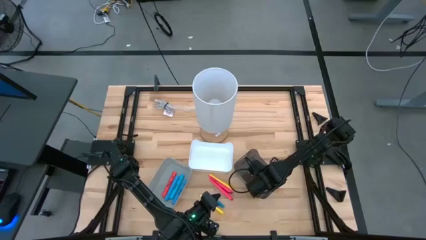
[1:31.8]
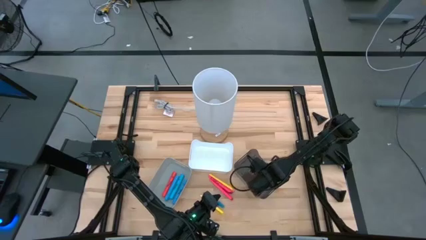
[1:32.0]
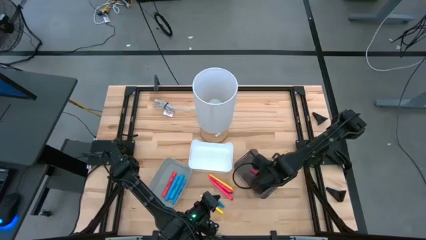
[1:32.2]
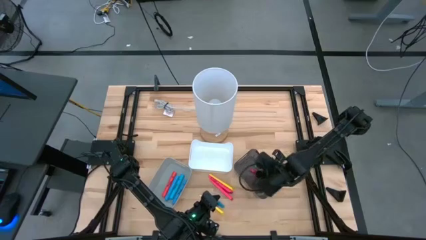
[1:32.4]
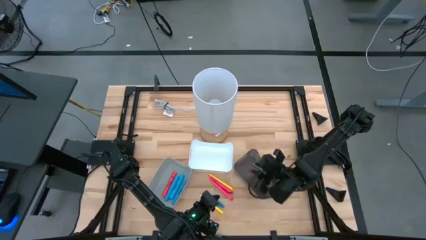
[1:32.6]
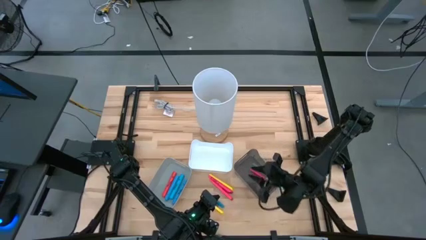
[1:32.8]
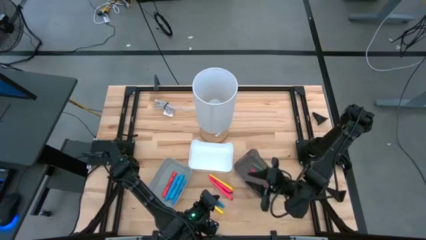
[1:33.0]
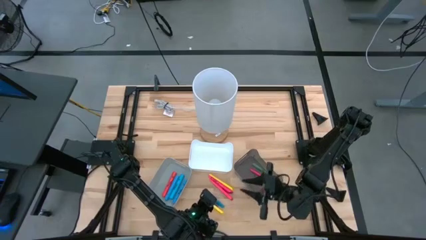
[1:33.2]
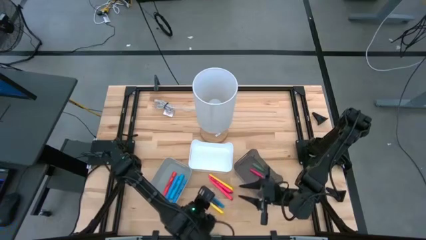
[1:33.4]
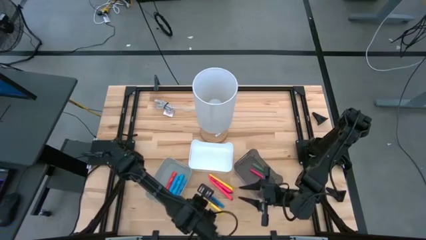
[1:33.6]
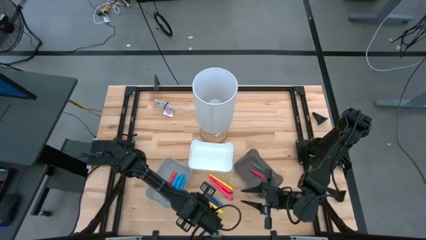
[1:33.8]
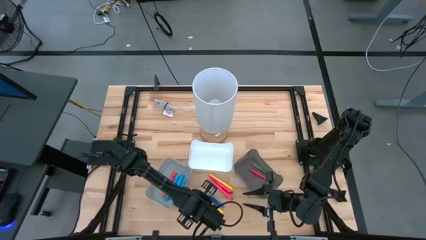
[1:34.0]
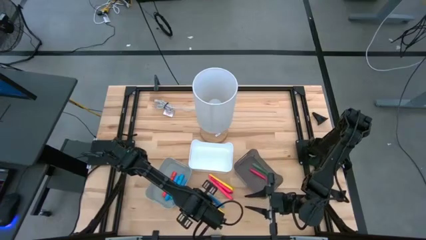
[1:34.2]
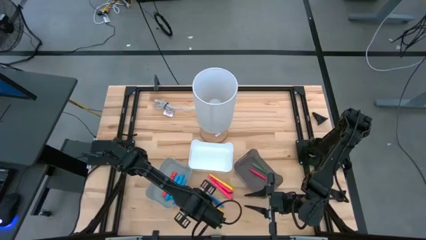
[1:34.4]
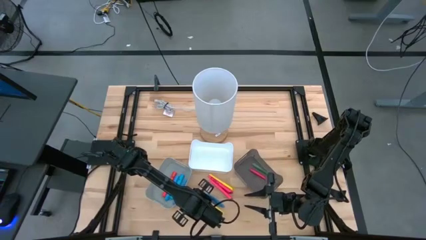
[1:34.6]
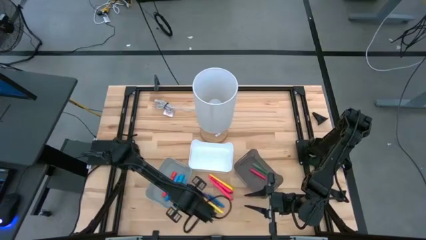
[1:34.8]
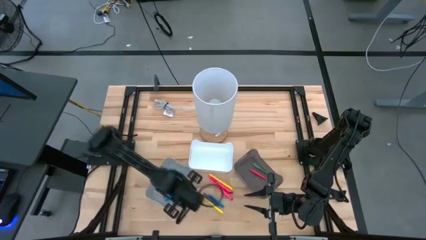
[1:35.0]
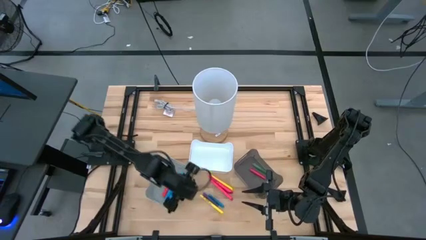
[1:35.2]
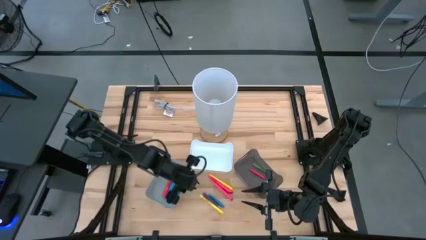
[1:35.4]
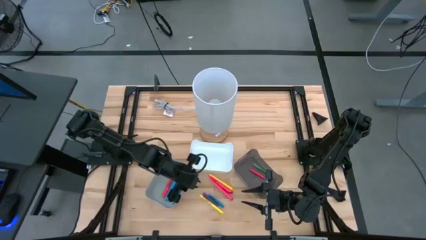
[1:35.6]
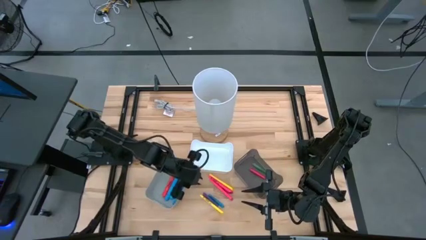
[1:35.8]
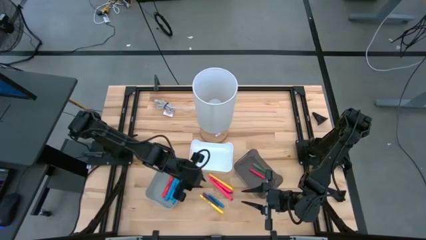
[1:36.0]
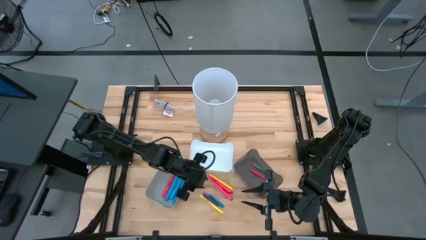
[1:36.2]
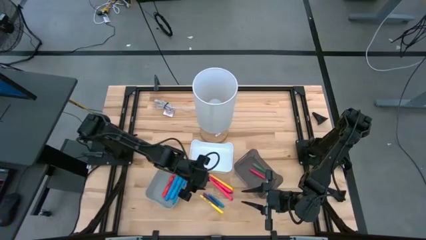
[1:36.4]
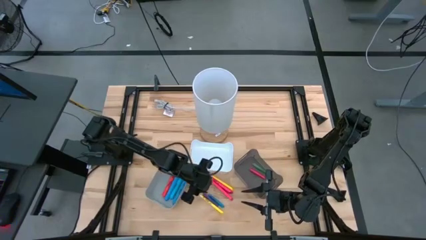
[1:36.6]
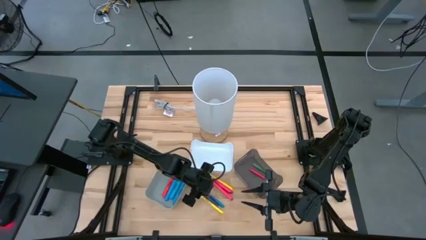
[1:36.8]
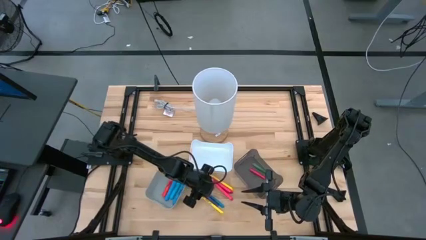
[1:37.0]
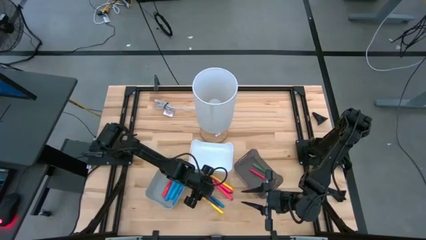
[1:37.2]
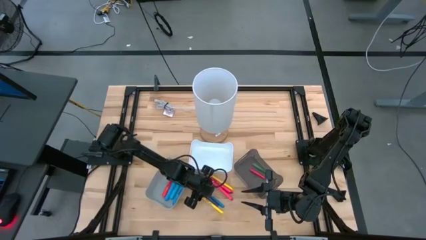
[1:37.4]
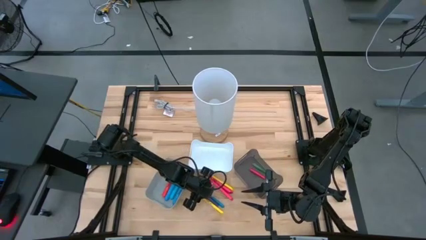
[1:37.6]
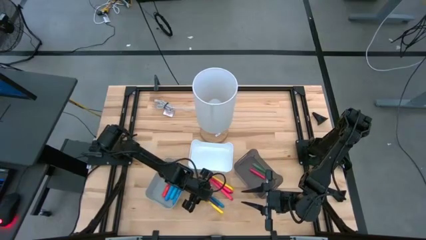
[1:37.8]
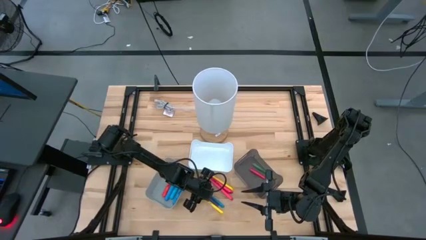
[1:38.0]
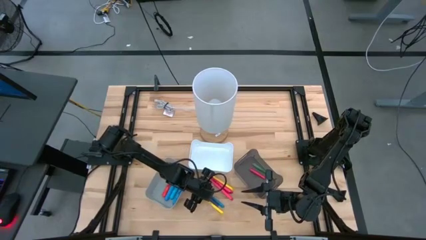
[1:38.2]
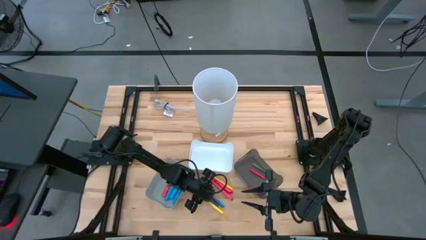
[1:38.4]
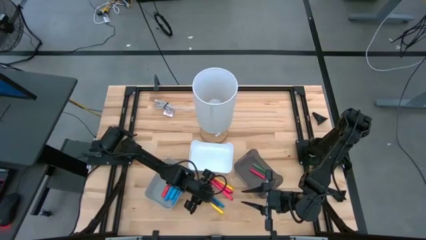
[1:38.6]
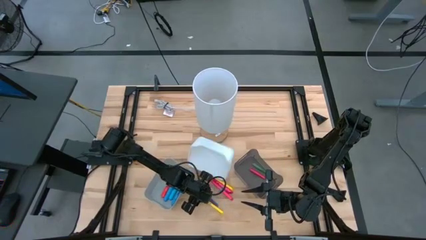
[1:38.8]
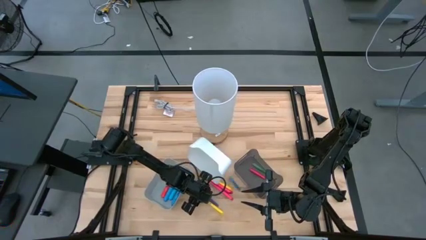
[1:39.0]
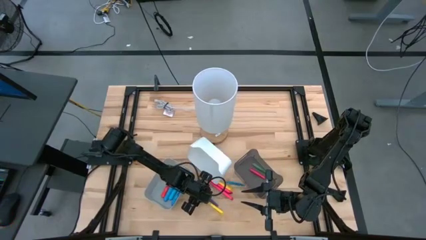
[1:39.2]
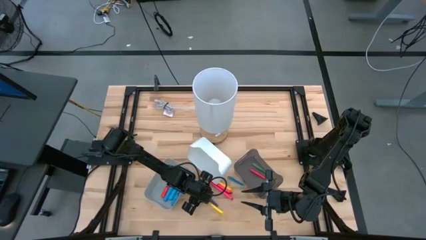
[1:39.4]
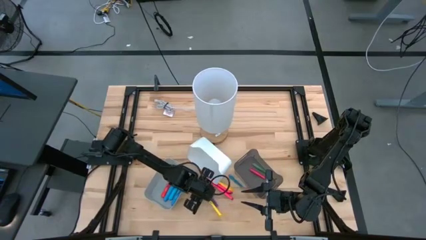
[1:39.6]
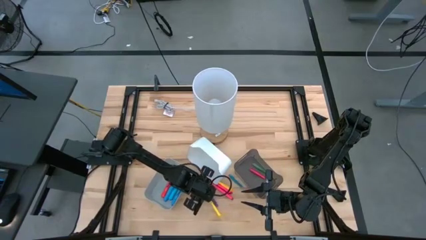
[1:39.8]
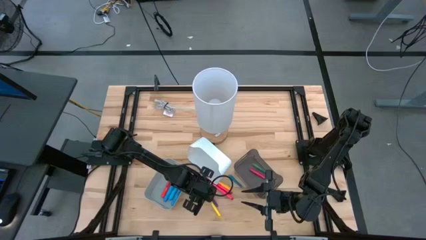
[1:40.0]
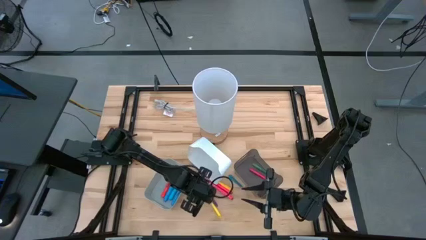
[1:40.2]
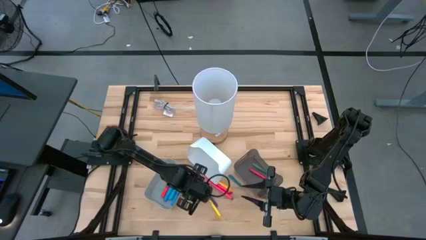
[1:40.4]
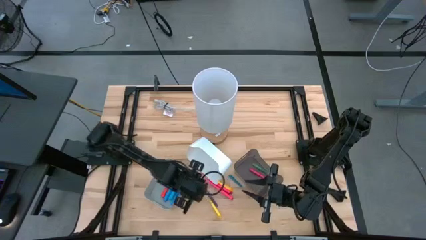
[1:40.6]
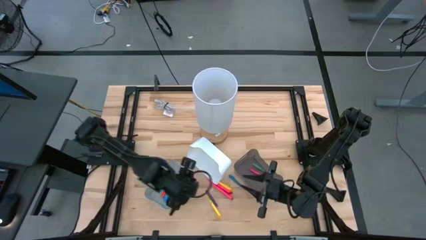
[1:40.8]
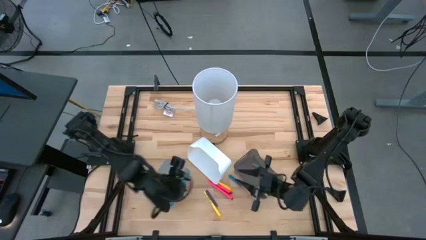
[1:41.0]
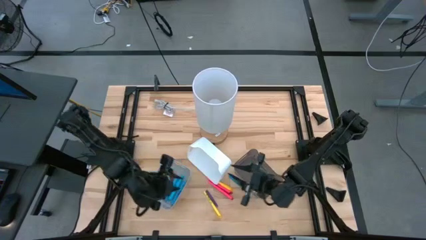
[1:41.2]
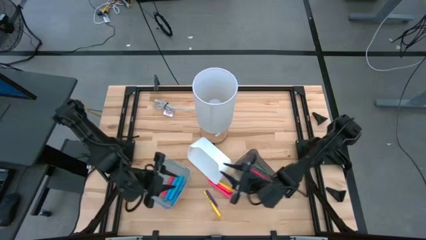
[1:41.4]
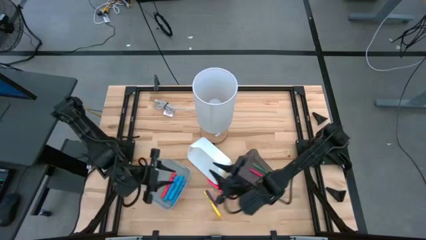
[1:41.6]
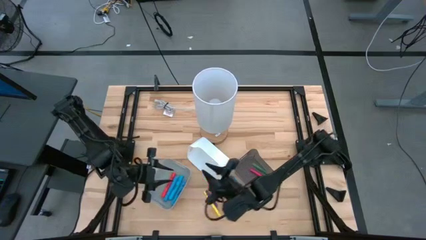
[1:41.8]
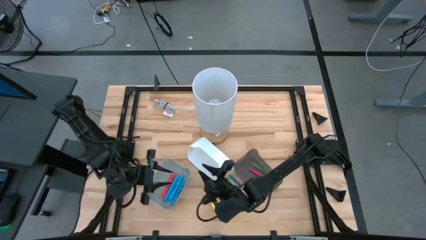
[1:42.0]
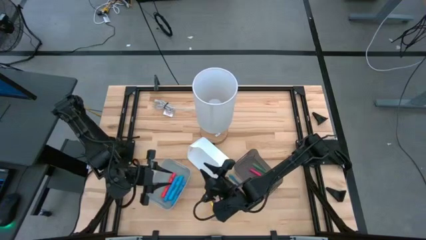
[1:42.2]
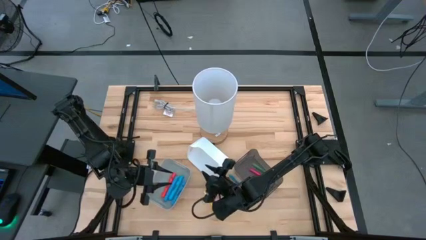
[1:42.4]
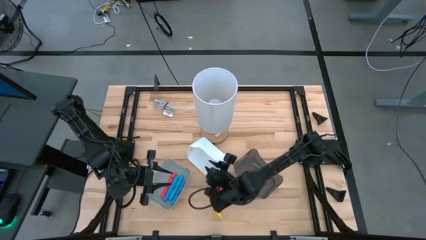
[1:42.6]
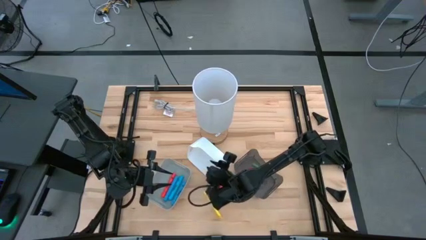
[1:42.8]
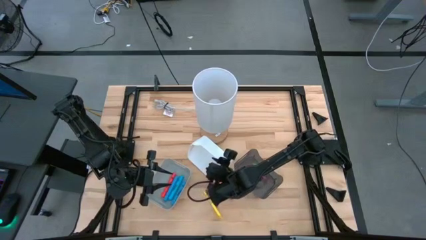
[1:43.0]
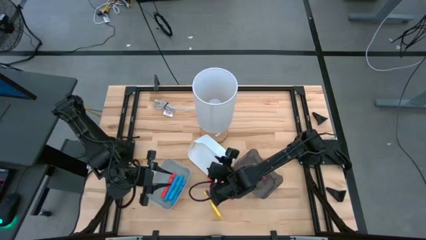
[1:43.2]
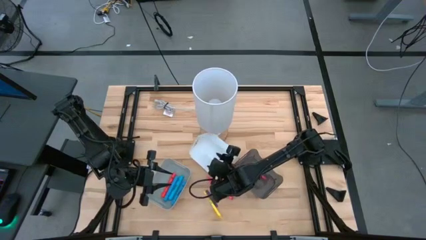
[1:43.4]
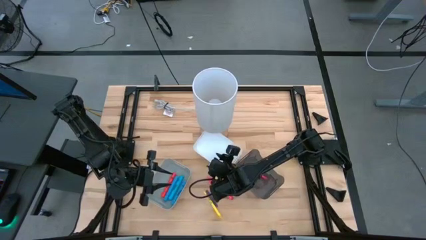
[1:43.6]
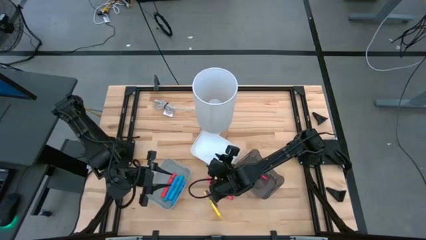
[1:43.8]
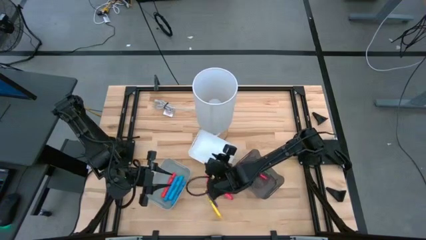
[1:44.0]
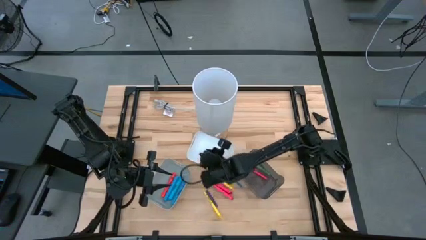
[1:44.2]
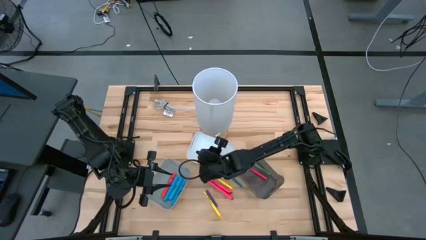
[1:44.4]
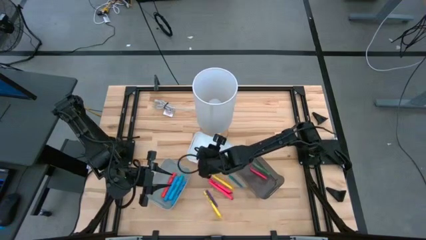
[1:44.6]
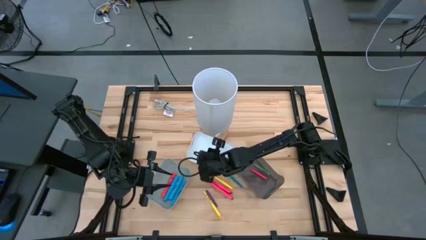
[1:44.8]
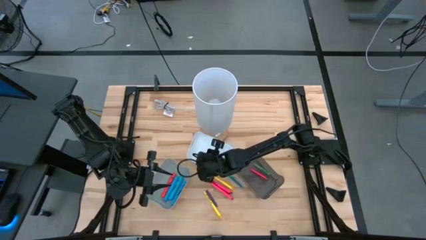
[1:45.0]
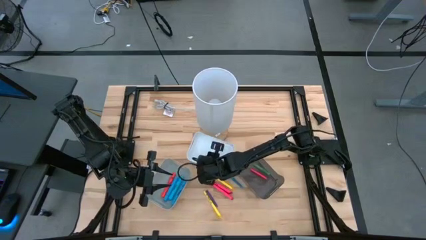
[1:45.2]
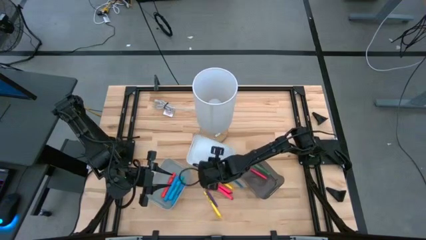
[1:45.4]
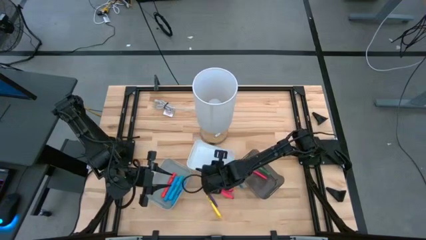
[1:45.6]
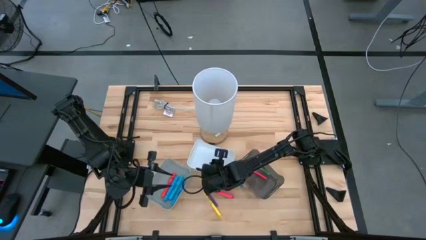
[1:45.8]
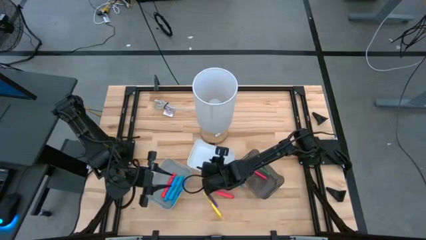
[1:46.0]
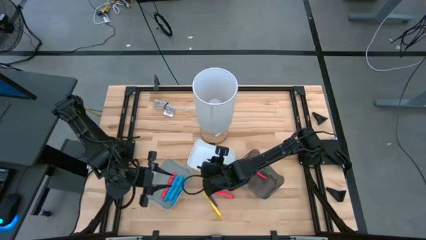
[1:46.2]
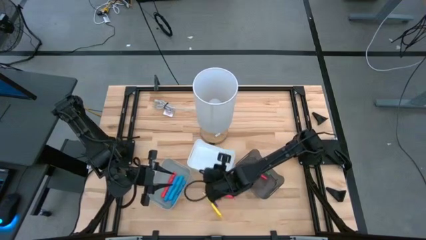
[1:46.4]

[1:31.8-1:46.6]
Task: Pick & Place Markers
Adjust the white bin
